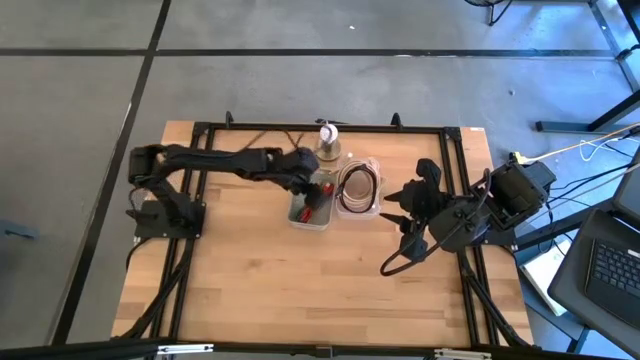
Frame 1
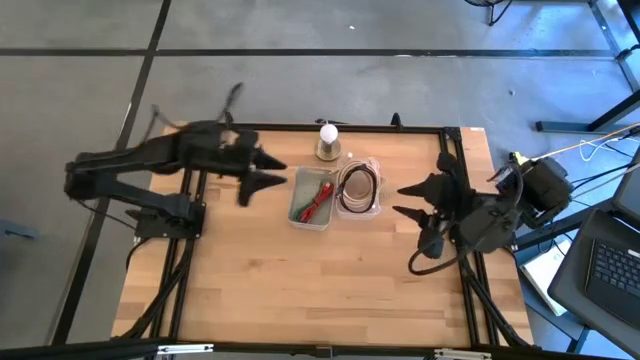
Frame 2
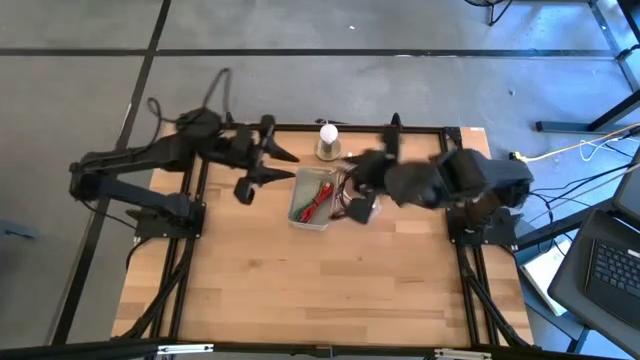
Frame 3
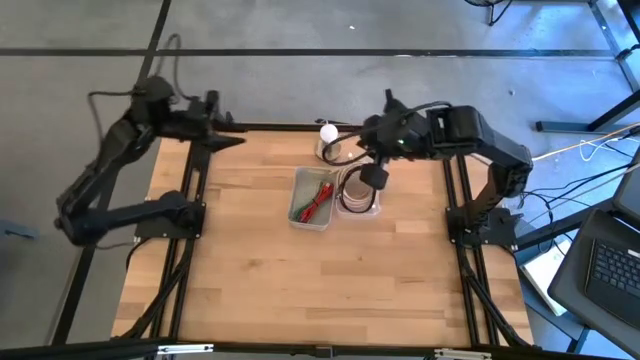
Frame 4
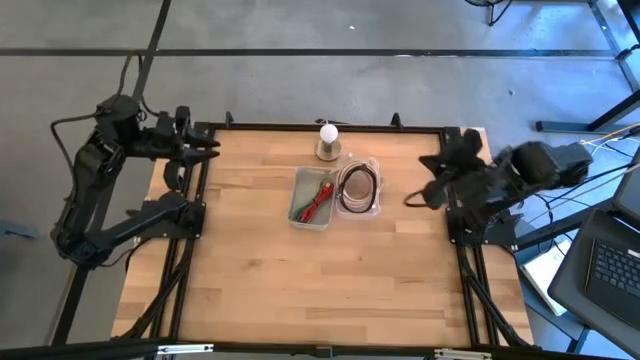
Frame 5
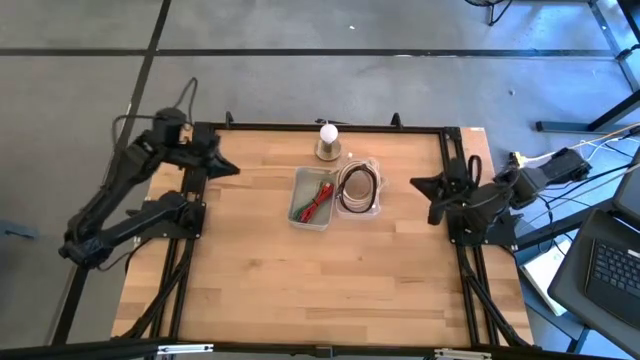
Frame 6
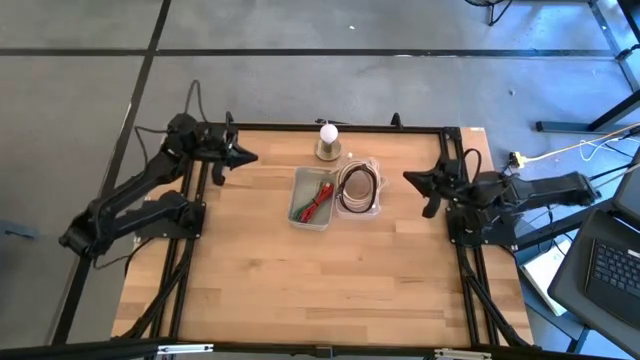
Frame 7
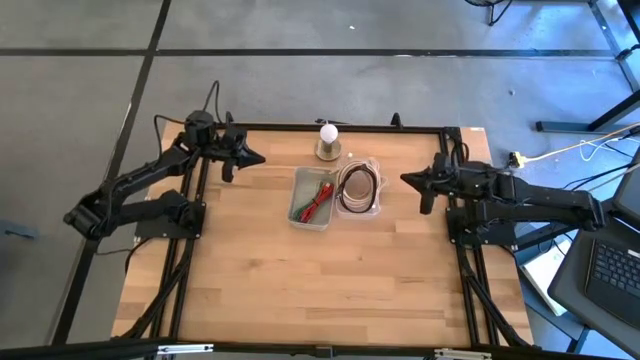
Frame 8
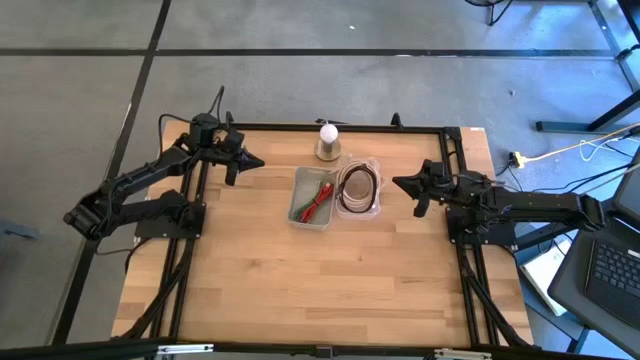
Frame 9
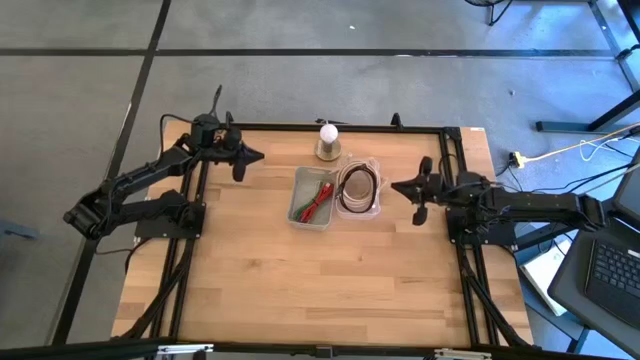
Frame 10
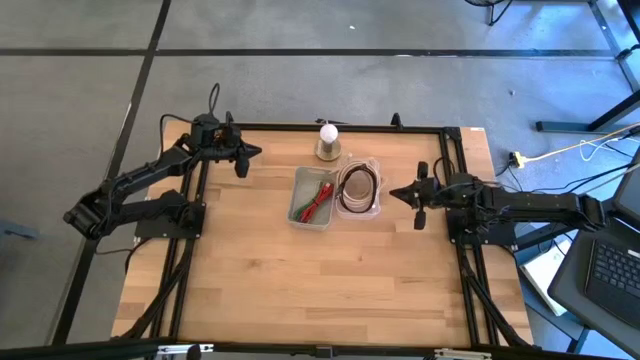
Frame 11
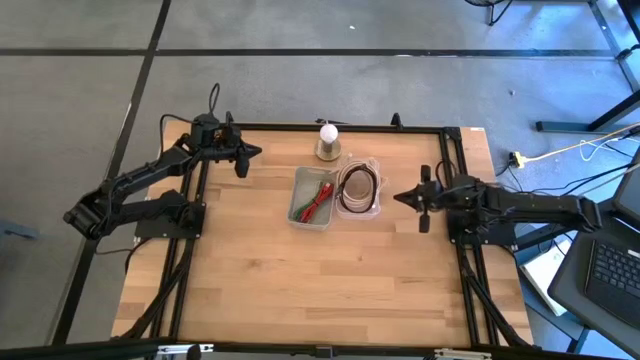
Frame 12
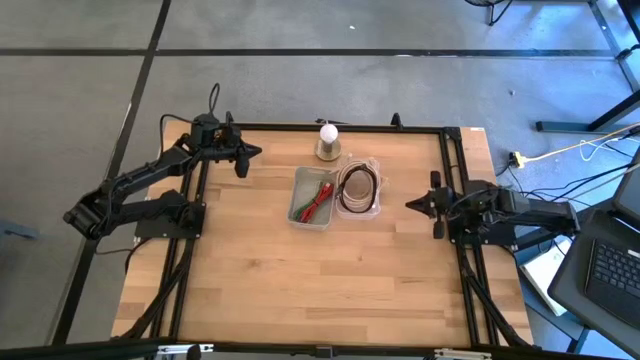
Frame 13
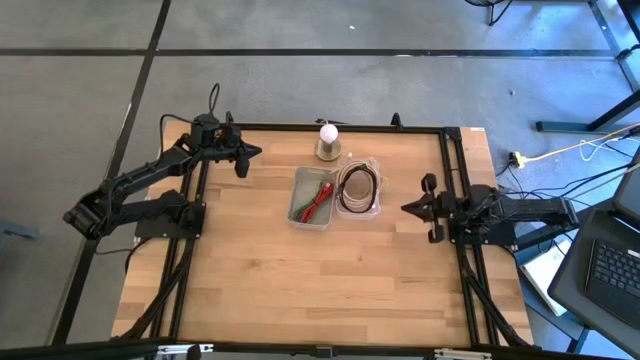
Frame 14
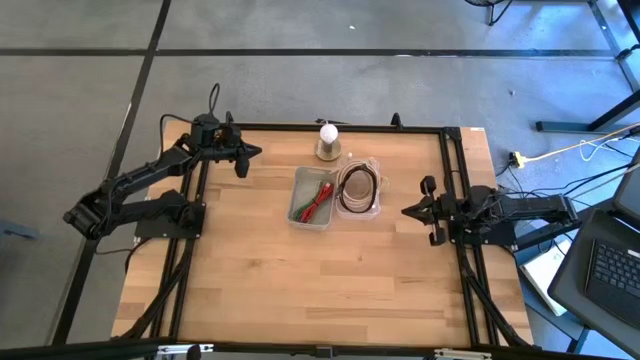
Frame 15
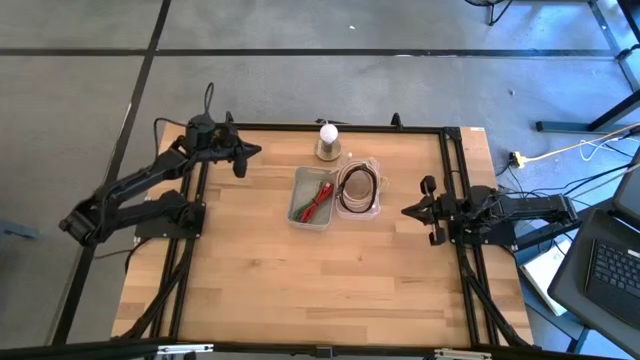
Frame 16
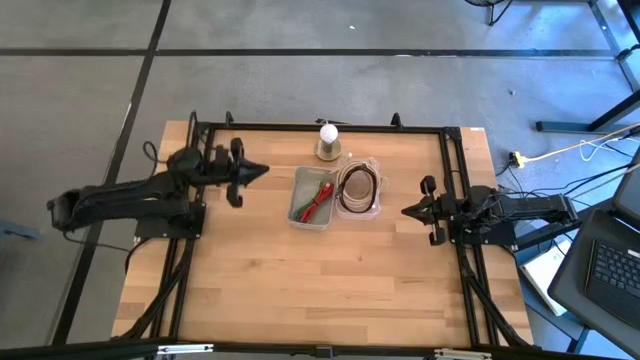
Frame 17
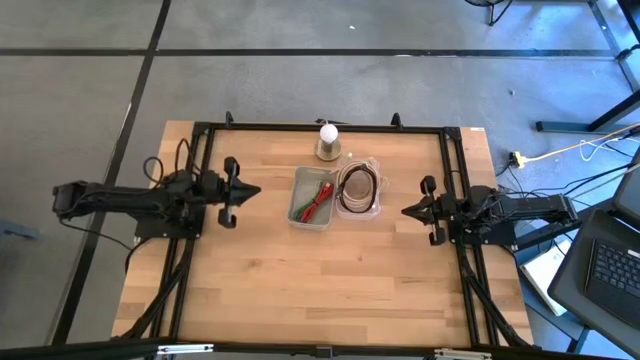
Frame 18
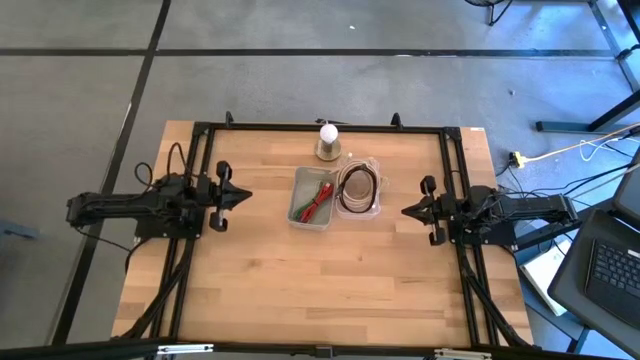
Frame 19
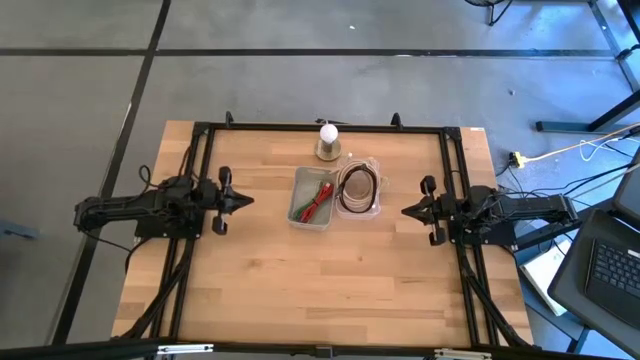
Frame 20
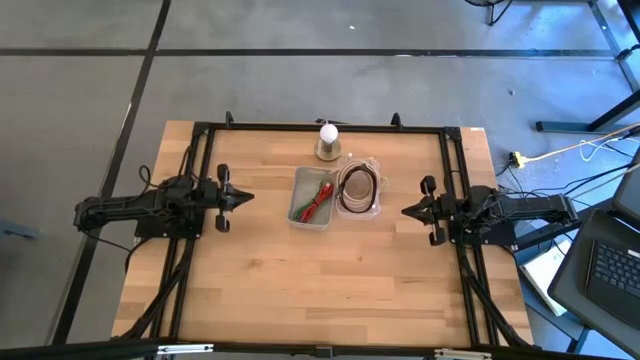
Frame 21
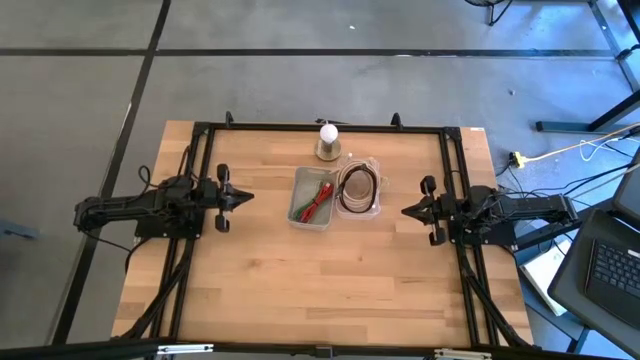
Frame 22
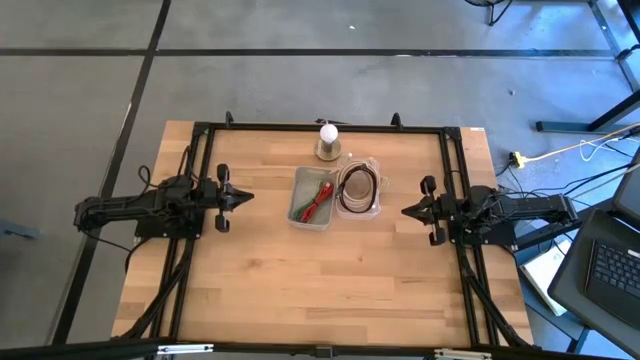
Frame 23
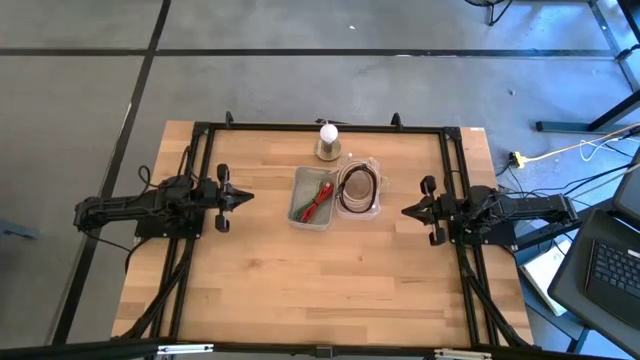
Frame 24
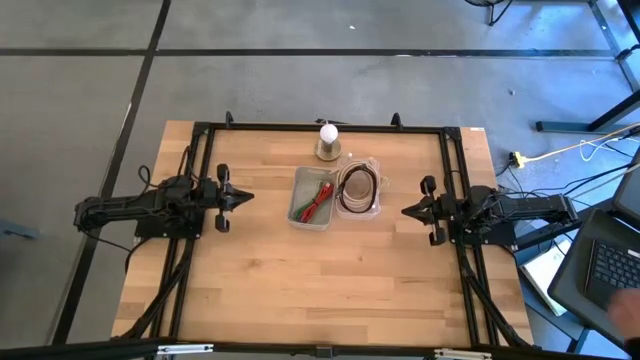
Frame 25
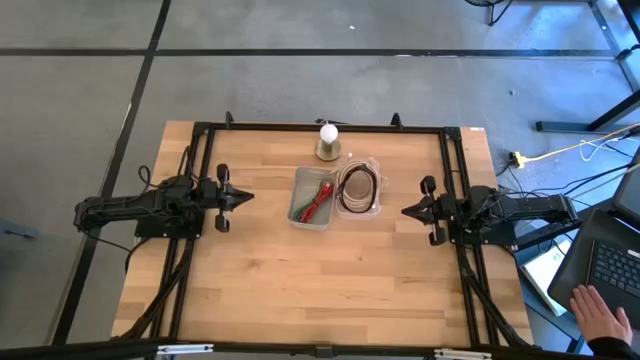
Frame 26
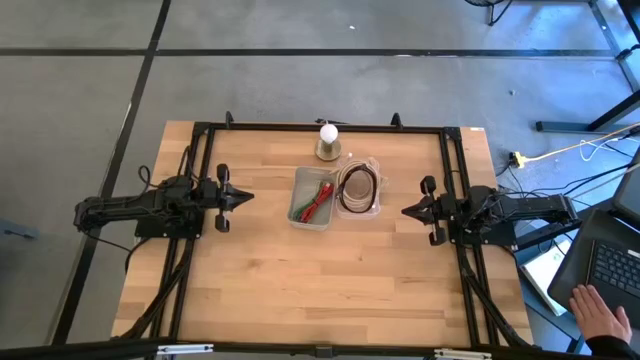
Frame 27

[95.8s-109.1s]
Task: Pick and place USB-C Cables
Return to Home Position

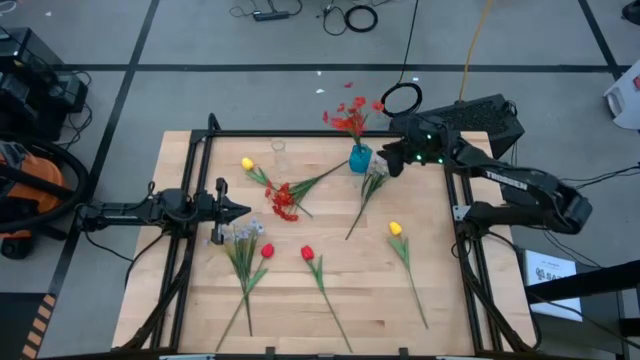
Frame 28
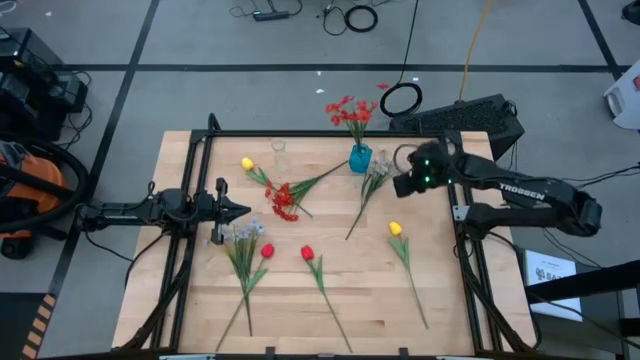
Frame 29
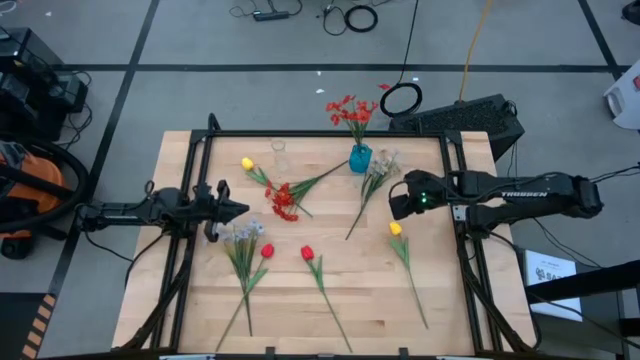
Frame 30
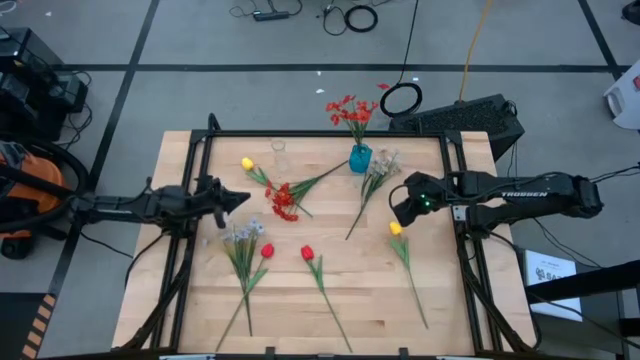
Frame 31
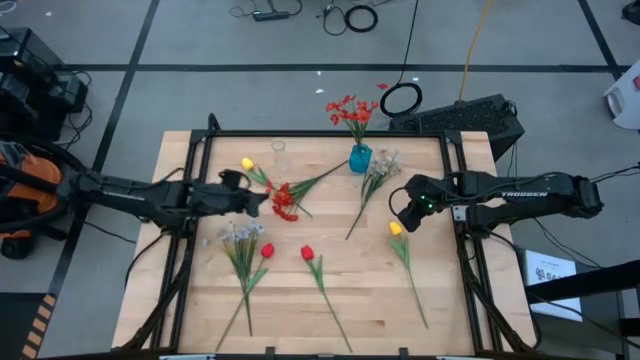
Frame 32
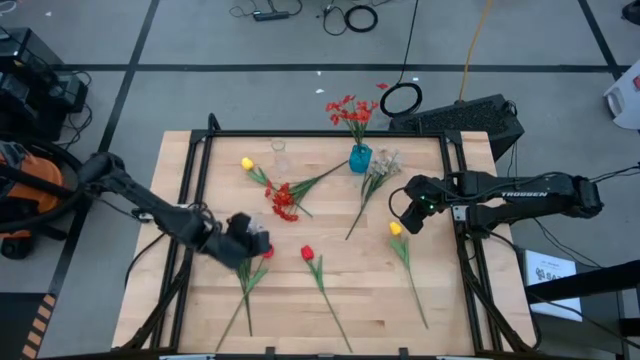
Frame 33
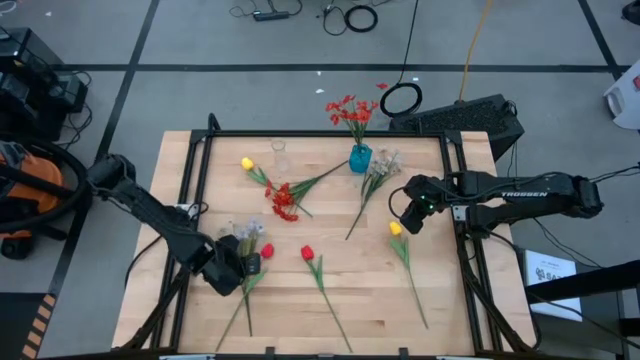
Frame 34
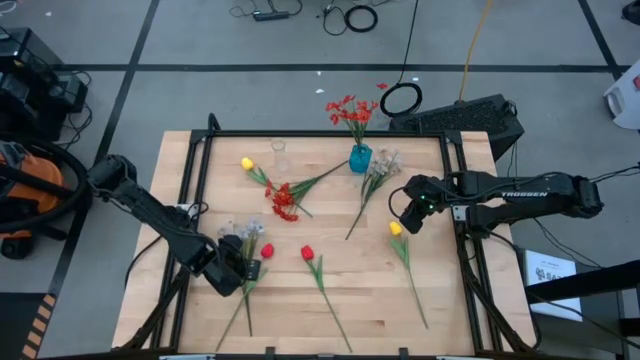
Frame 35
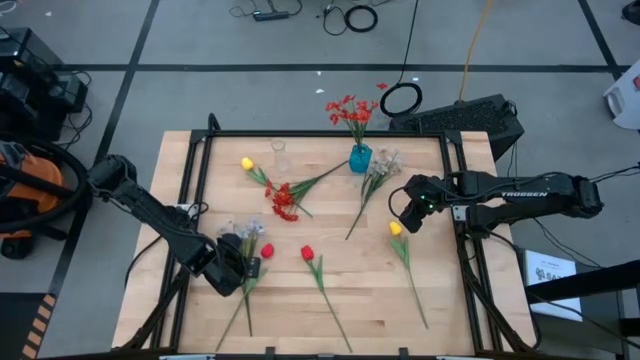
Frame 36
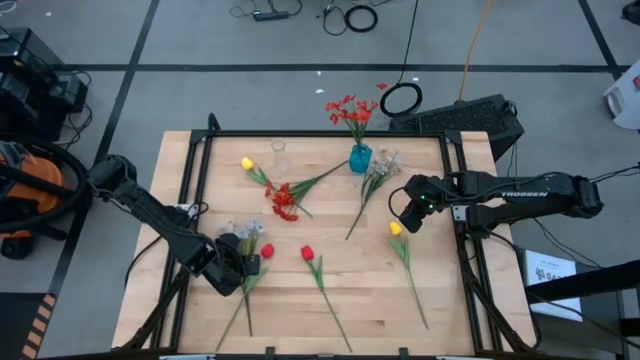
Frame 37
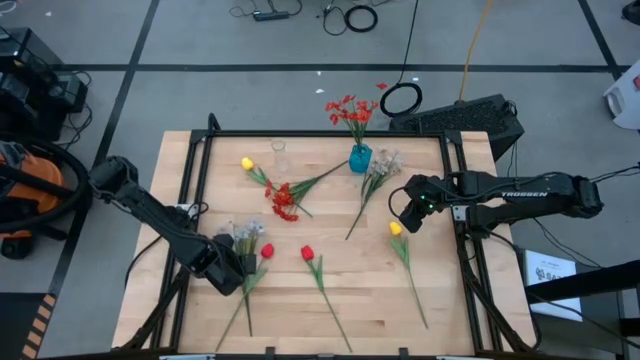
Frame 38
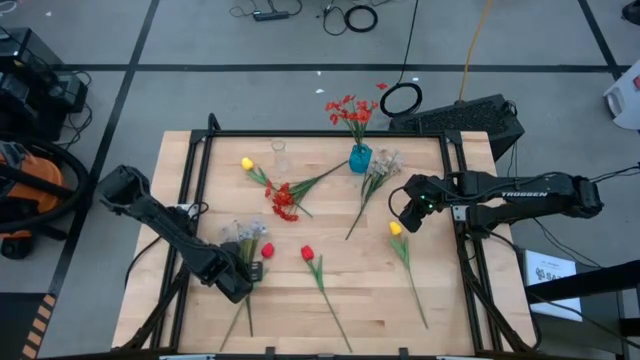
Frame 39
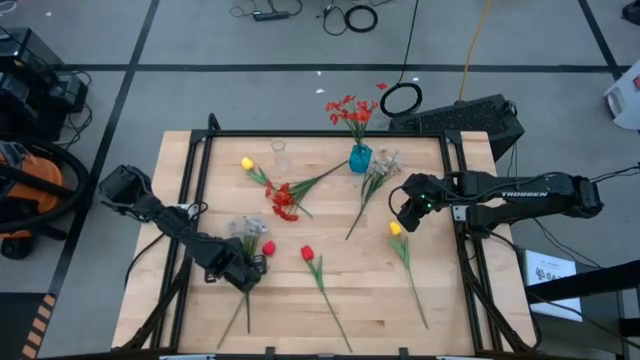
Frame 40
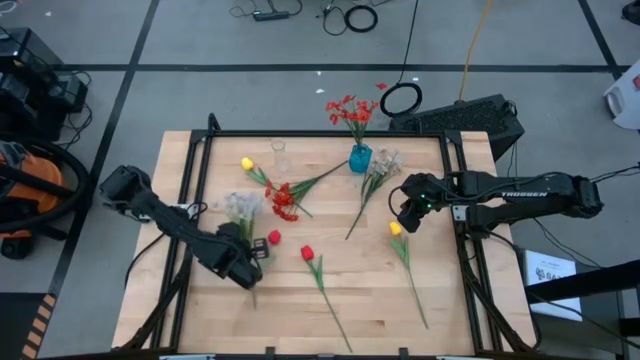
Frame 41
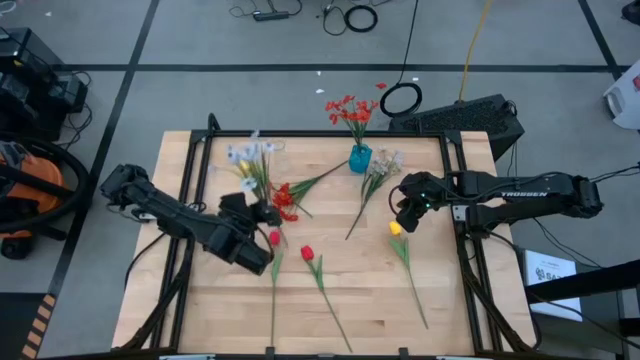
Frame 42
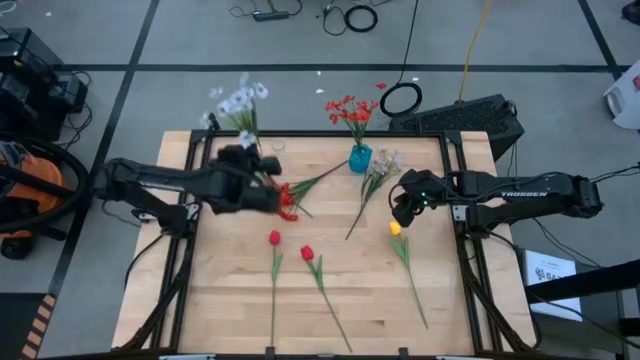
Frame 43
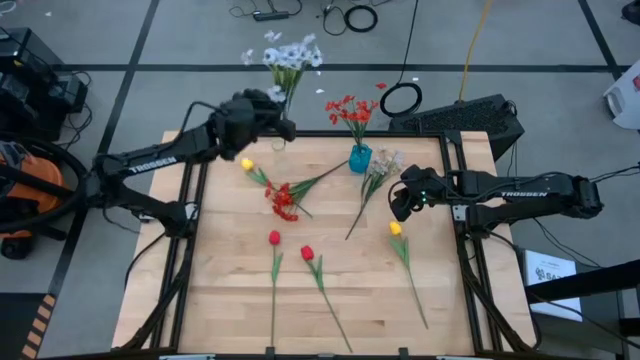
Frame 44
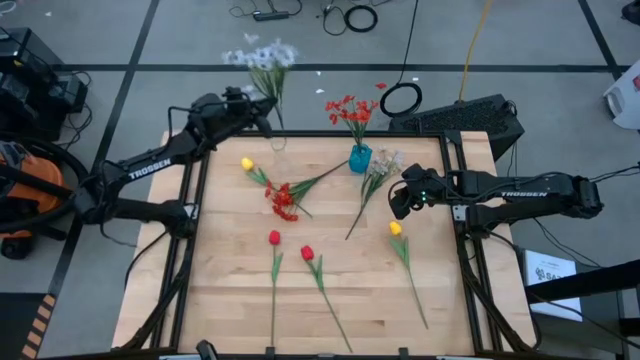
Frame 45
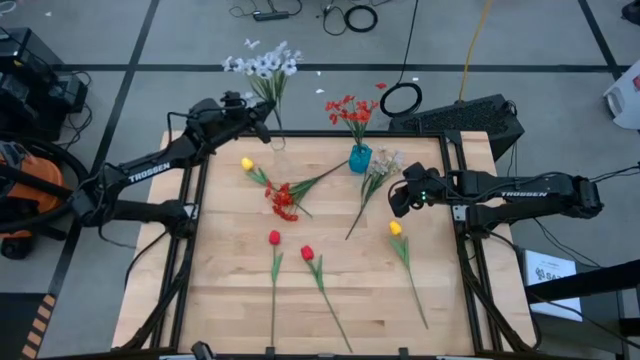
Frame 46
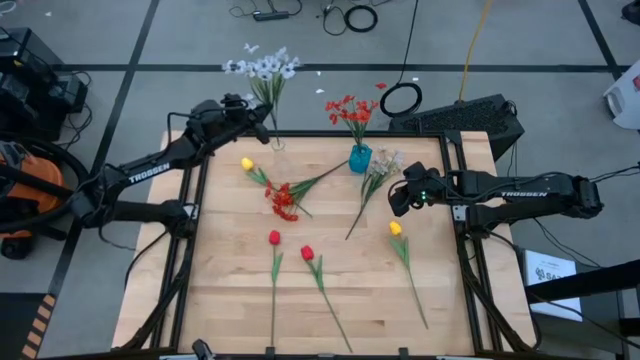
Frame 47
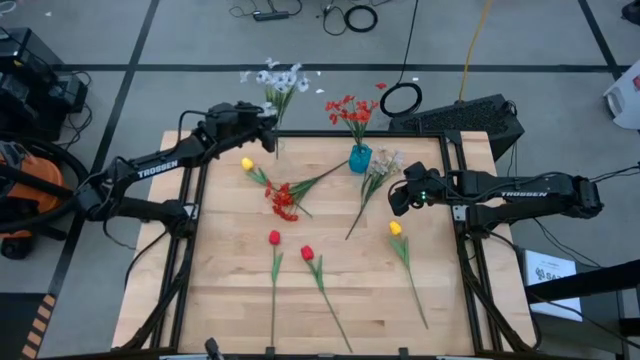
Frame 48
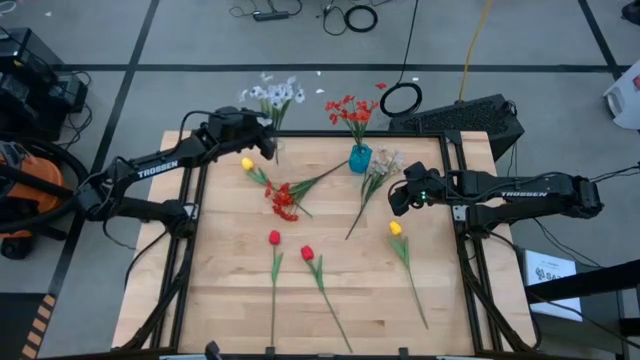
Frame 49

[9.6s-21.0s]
Task: Sort flowers into vase by color
Put the bottom white flower into the transparent vase
